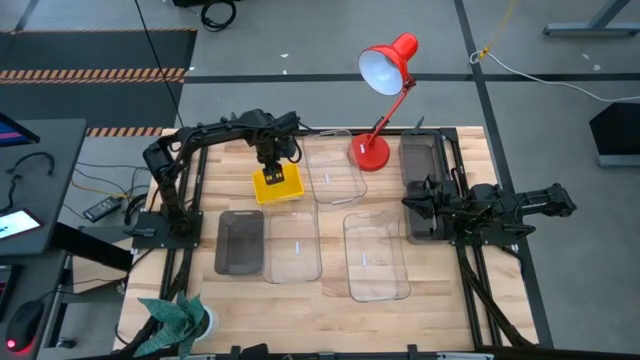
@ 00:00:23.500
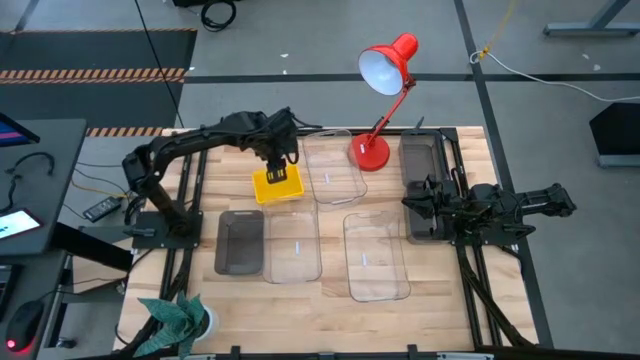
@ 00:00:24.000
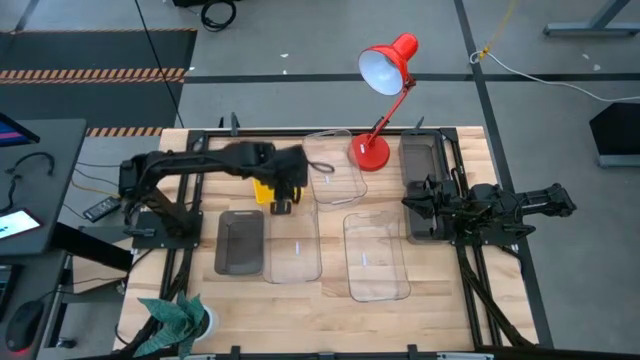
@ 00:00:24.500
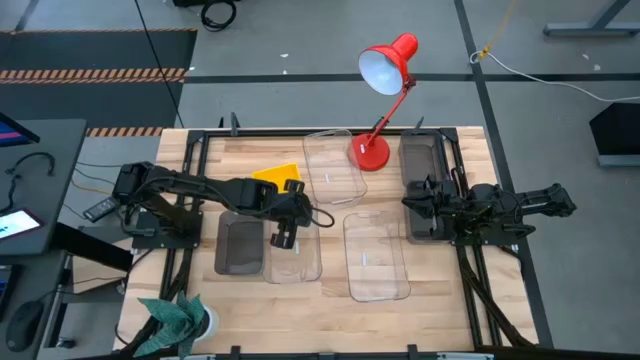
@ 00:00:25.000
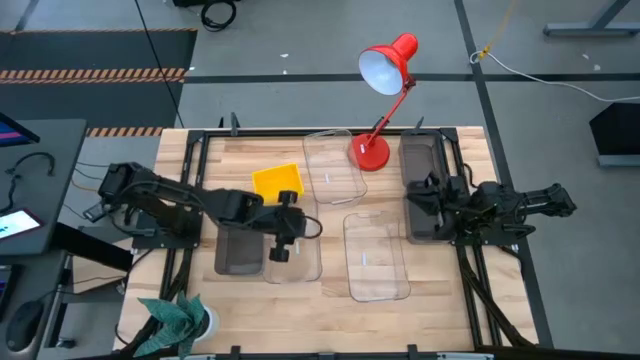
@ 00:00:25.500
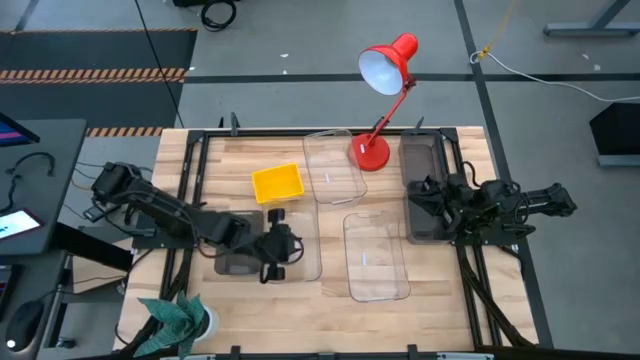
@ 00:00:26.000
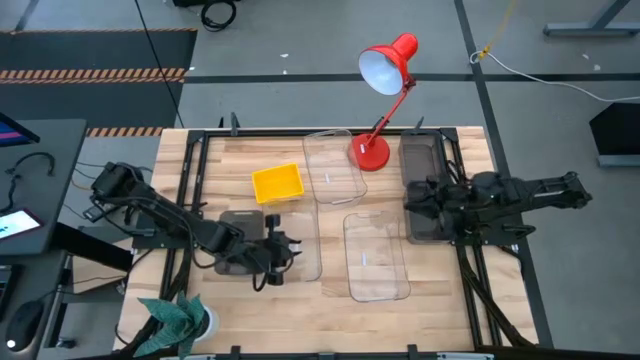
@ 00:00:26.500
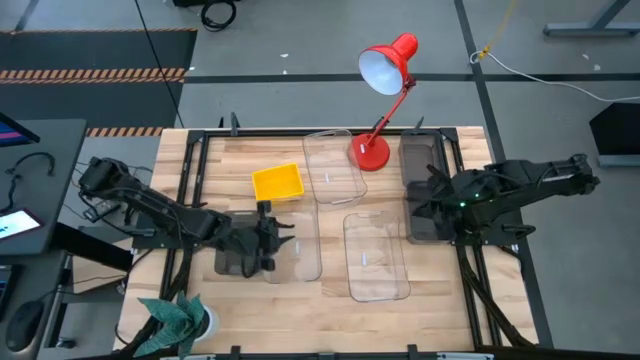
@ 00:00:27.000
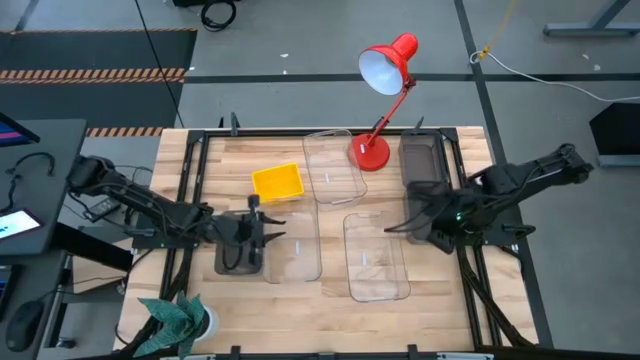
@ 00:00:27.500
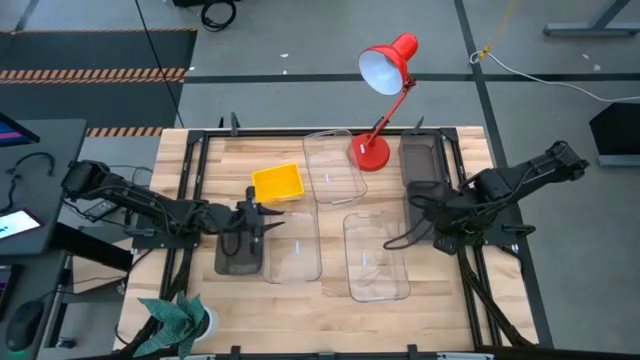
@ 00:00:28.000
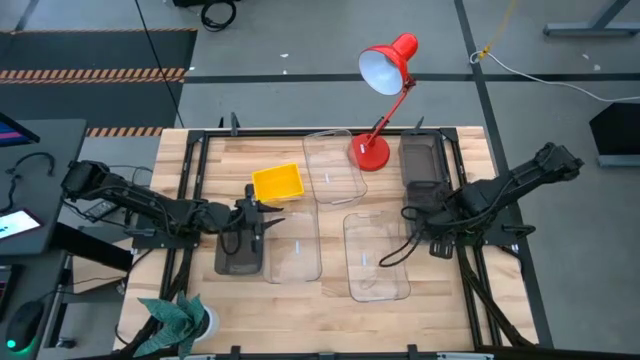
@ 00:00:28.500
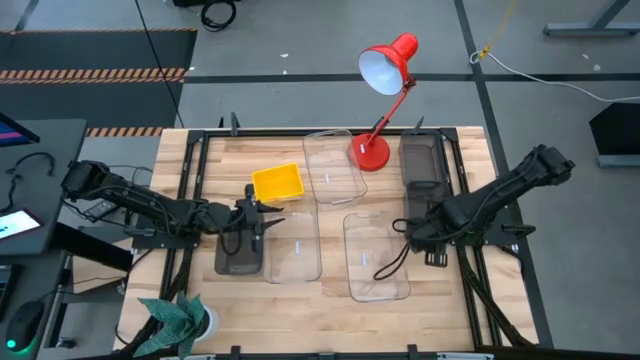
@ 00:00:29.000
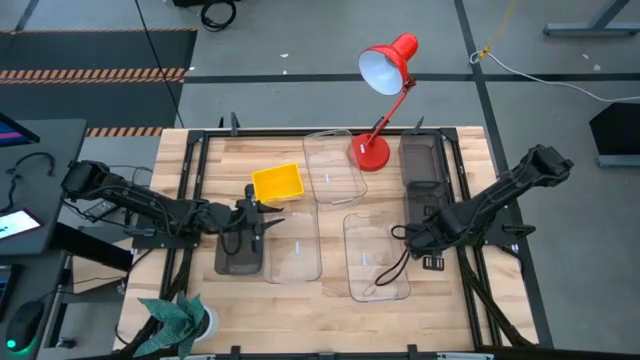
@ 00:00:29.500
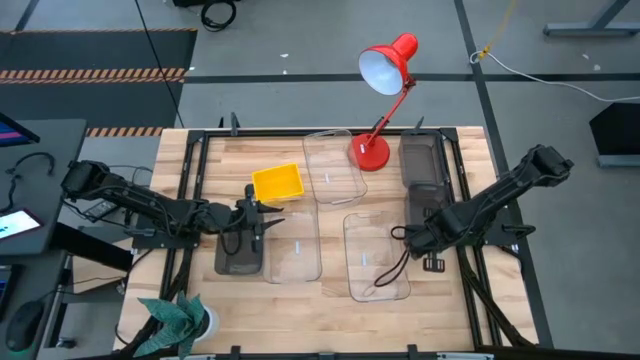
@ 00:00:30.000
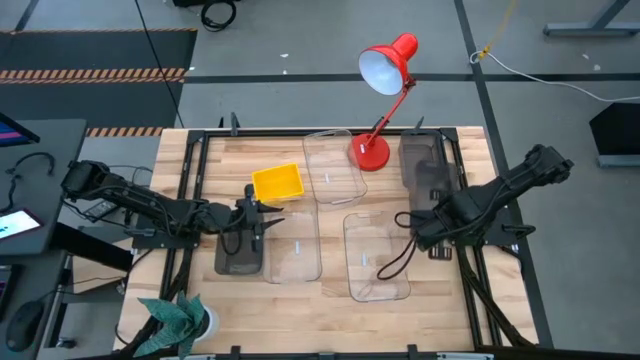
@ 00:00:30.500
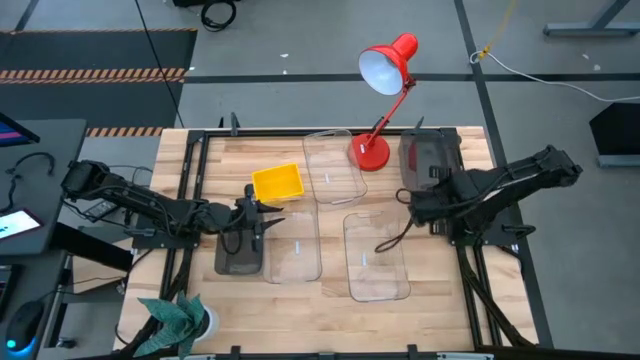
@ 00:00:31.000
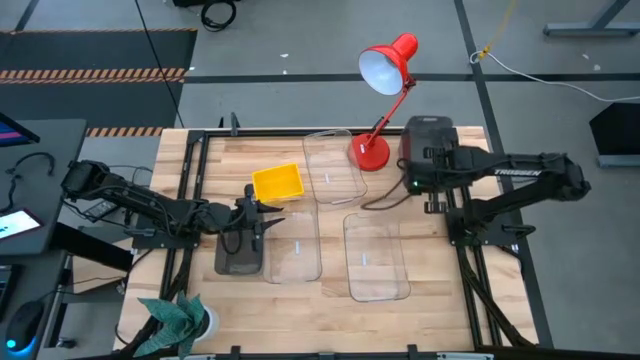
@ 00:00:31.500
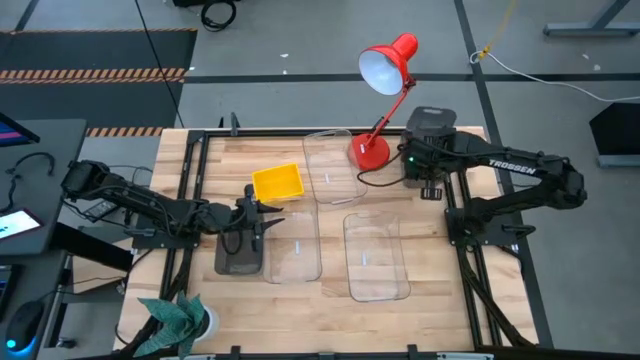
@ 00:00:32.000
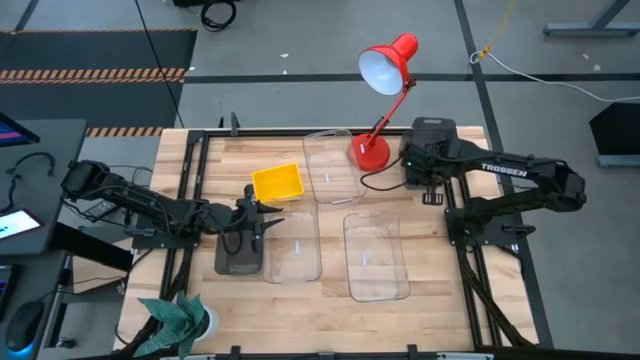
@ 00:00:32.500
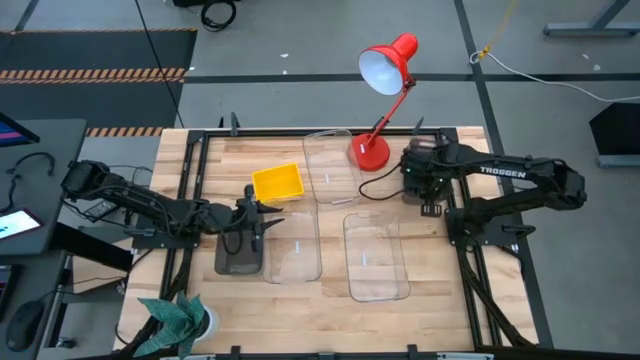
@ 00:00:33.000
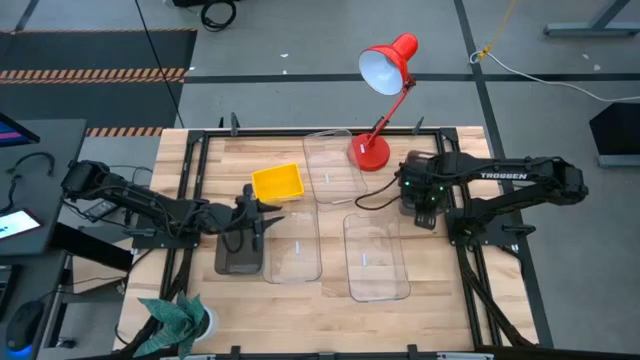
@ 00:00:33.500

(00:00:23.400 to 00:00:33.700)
Stack the bottom right black transparent bin on the top right black transparent bin

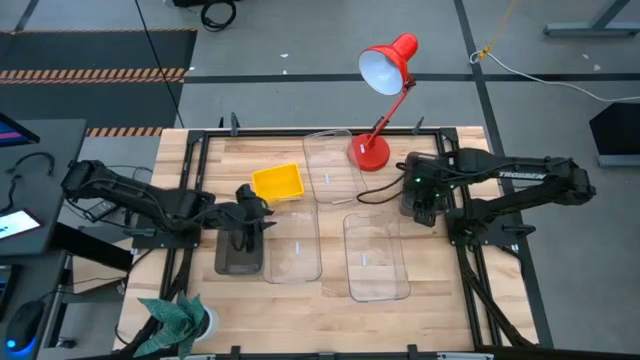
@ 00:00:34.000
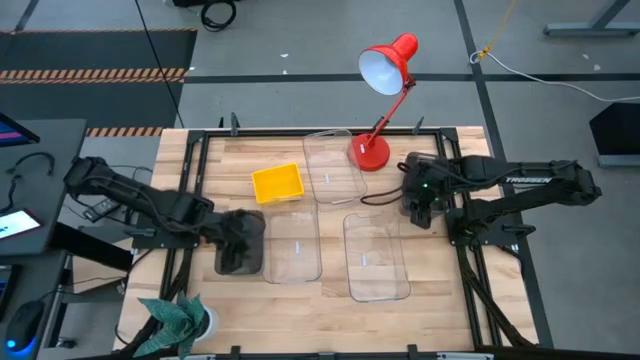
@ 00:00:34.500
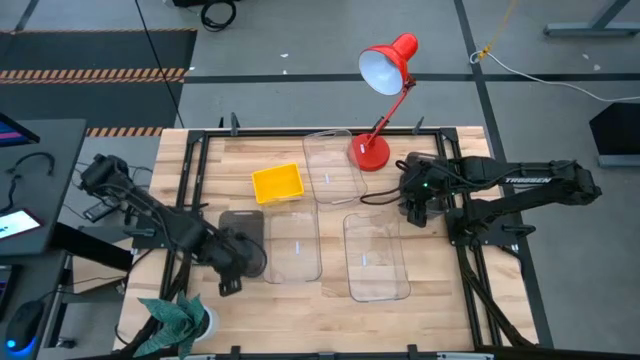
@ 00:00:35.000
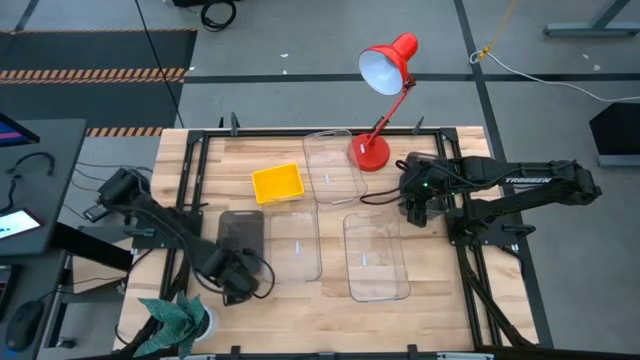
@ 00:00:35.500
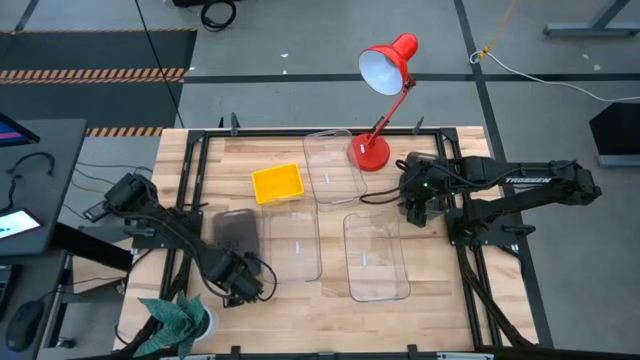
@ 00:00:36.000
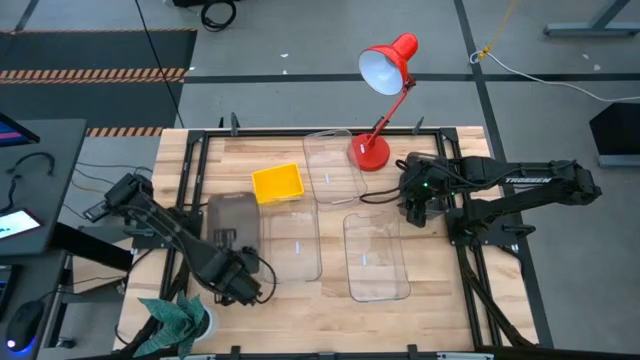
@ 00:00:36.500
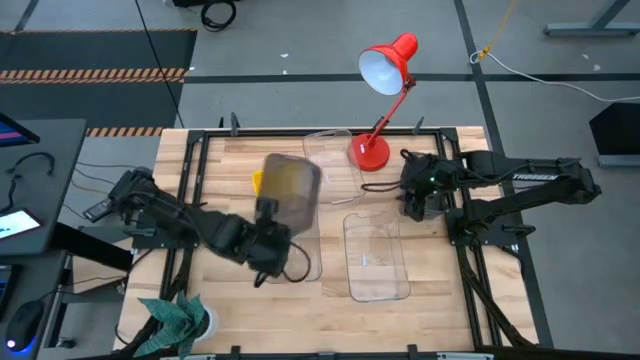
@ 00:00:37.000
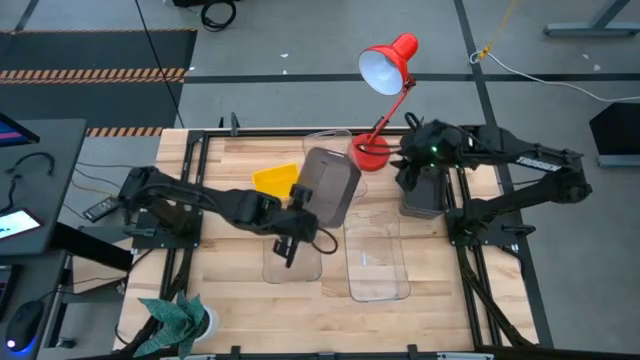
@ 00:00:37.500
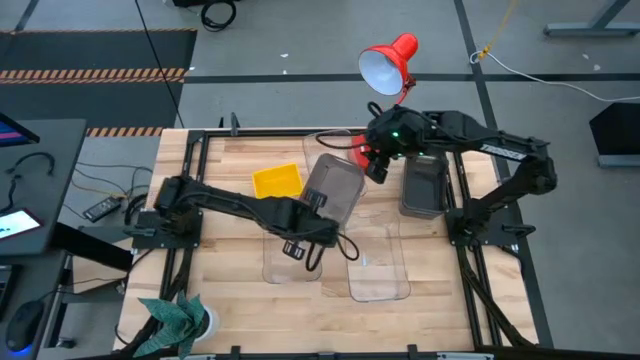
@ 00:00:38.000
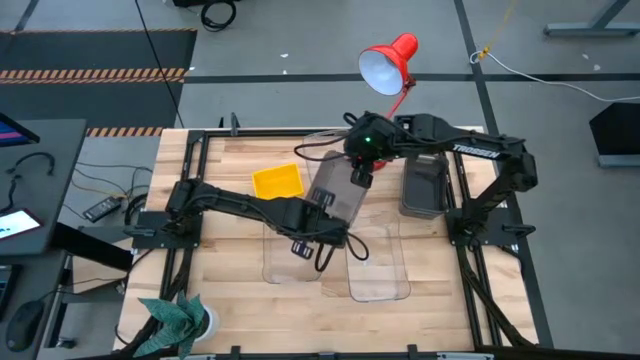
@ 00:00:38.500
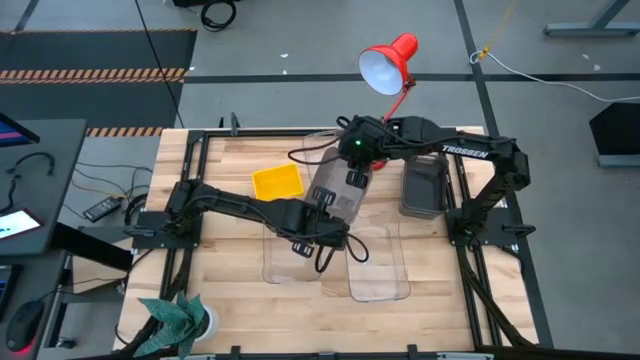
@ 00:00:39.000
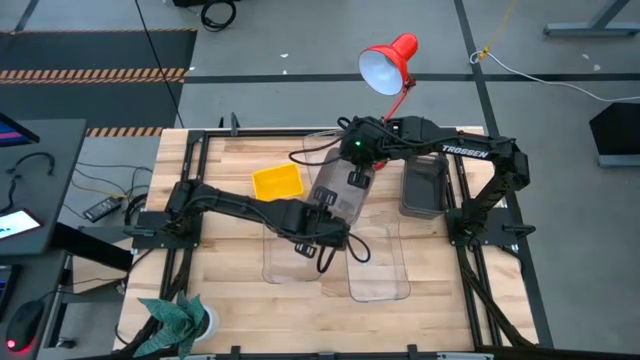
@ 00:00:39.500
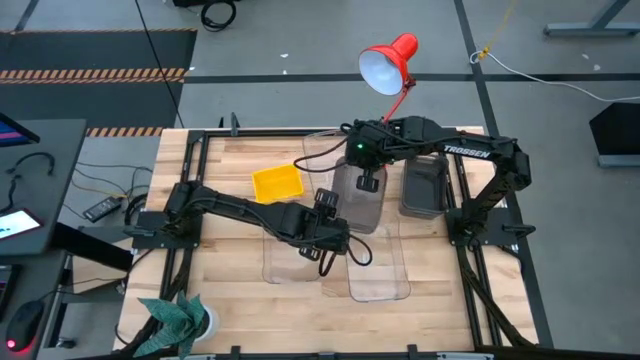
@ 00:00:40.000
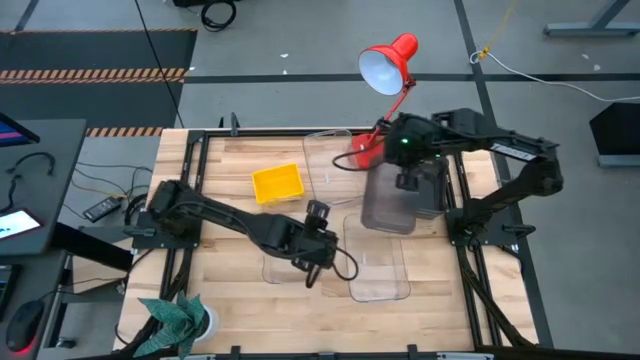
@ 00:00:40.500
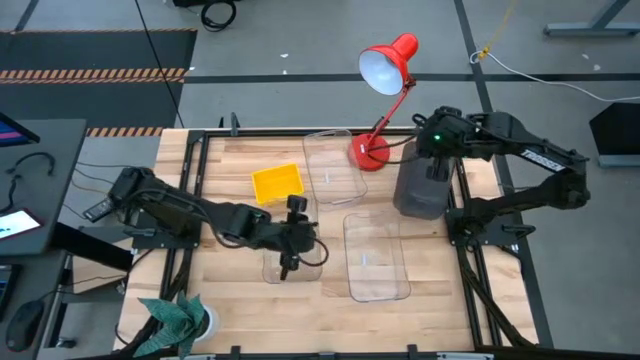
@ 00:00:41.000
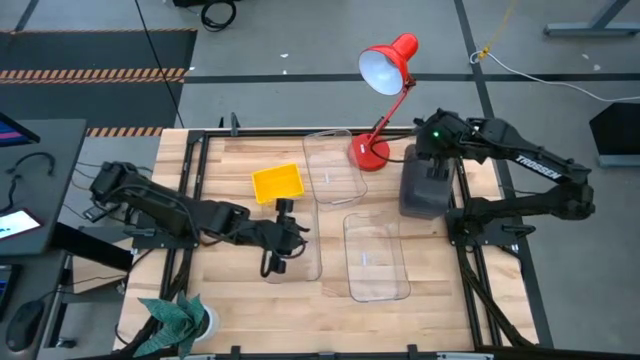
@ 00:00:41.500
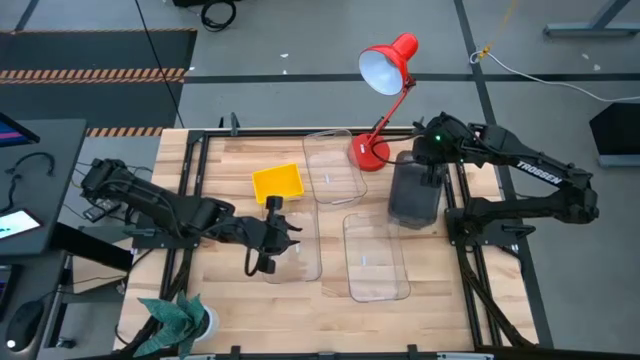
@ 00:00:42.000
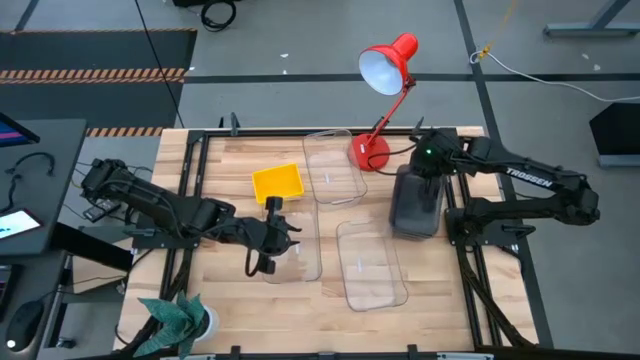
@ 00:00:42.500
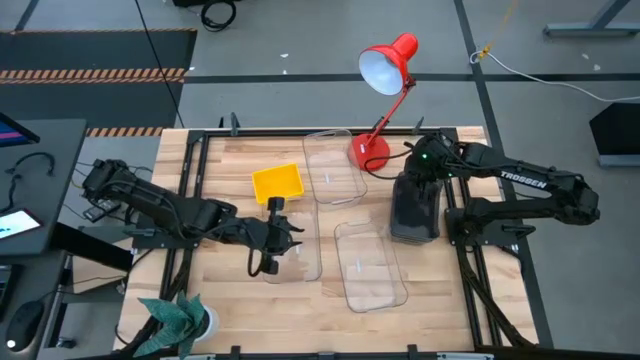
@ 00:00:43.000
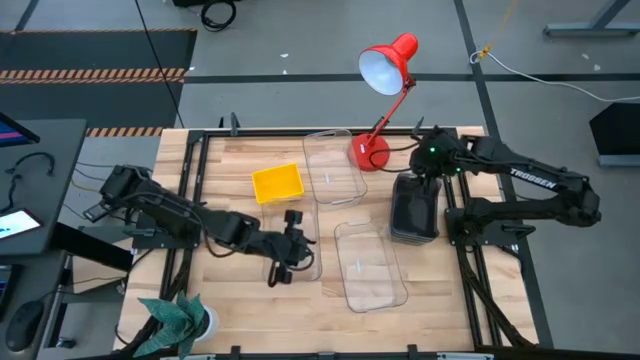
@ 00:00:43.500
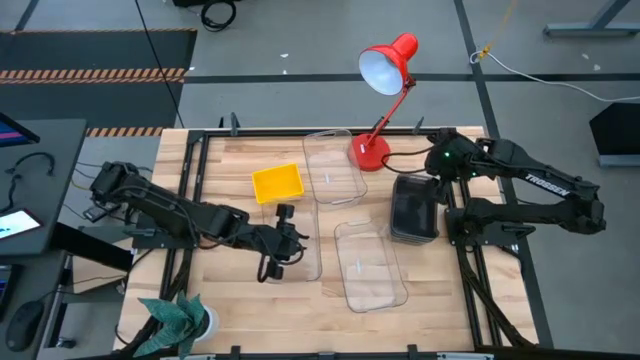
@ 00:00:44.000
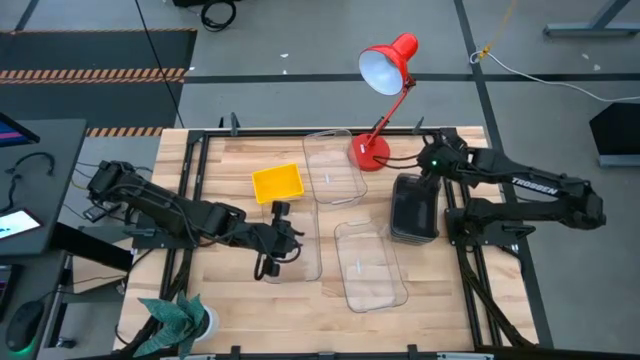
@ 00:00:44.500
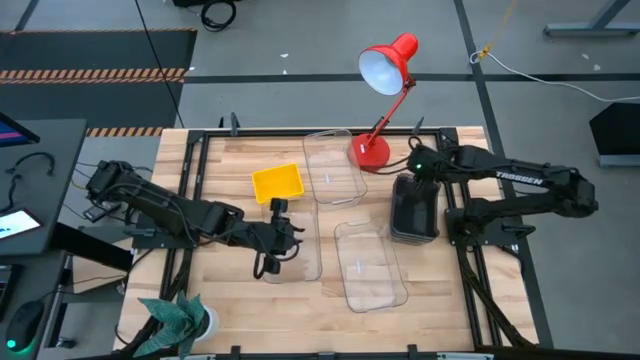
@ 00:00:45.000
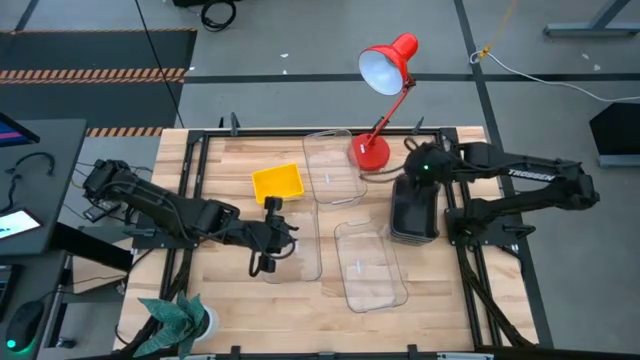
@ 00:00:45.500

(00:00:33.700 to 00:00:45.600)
Stack the left black transparent bin on the top right black transparent bin
